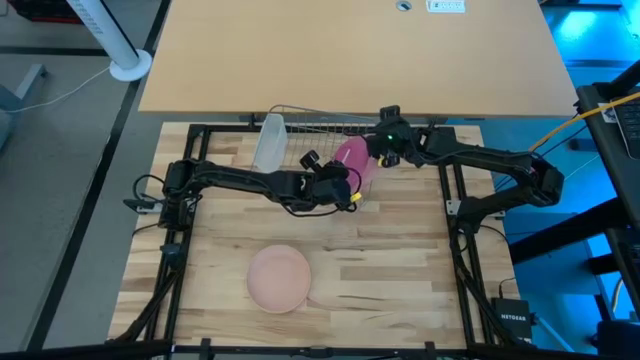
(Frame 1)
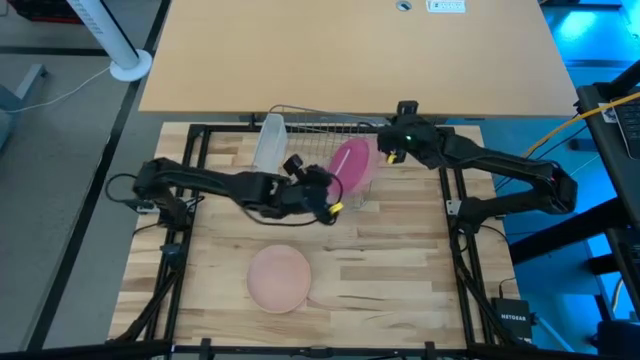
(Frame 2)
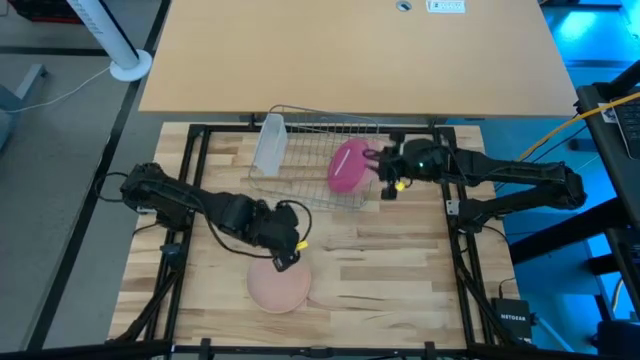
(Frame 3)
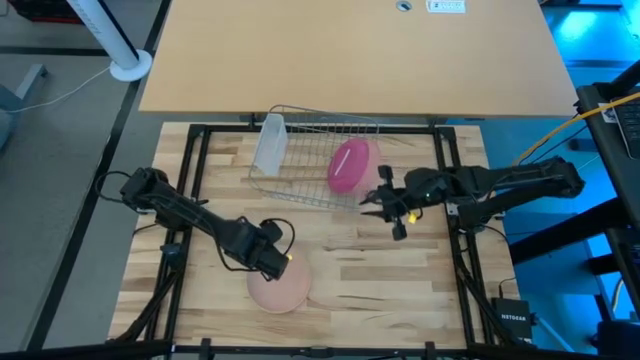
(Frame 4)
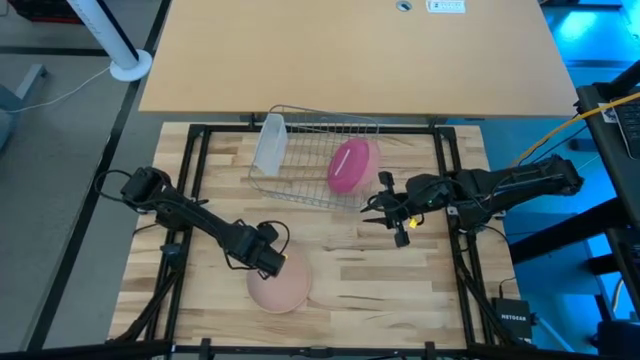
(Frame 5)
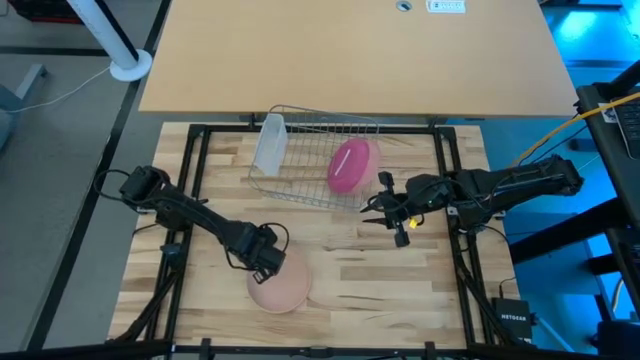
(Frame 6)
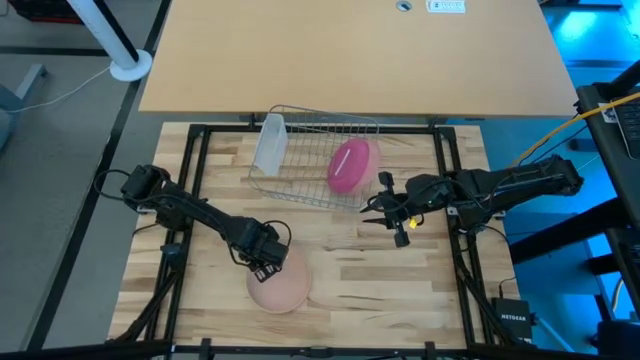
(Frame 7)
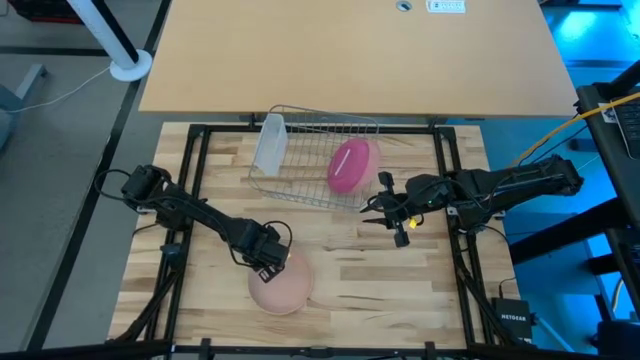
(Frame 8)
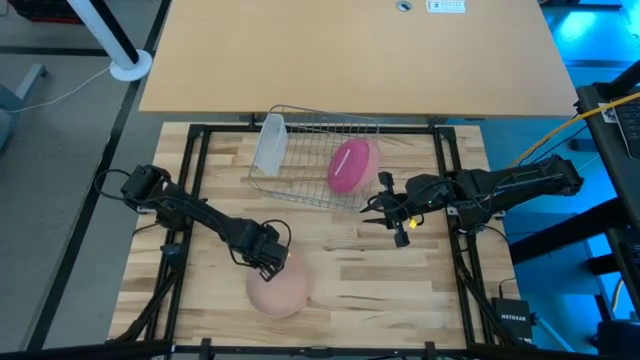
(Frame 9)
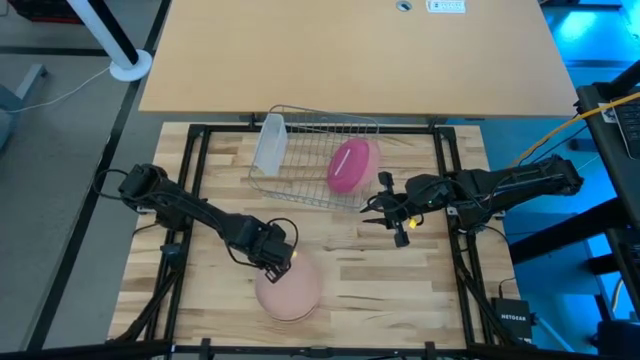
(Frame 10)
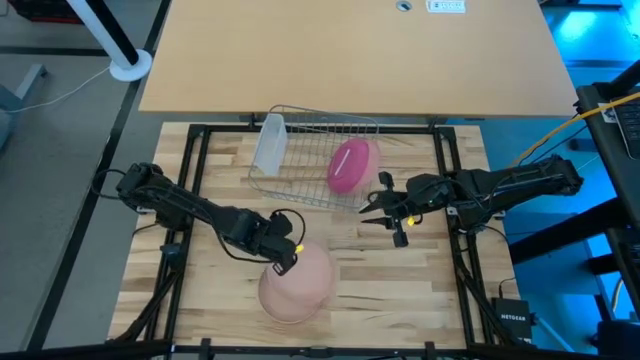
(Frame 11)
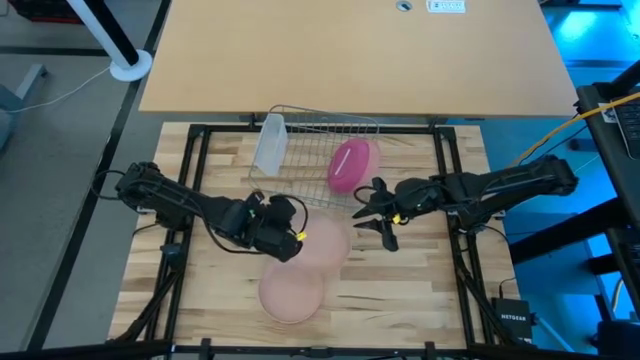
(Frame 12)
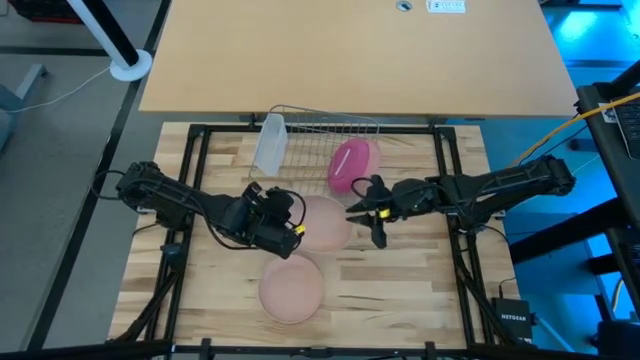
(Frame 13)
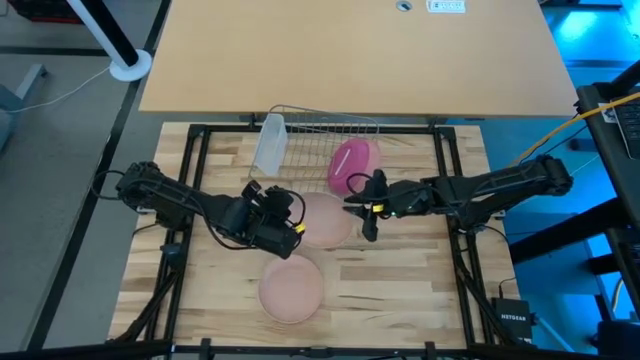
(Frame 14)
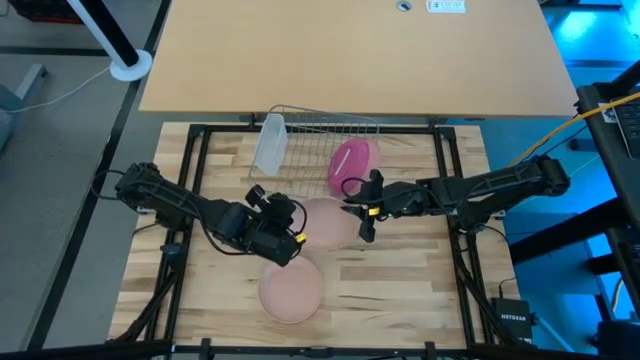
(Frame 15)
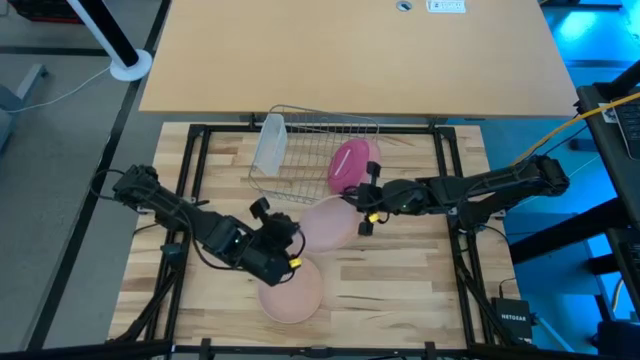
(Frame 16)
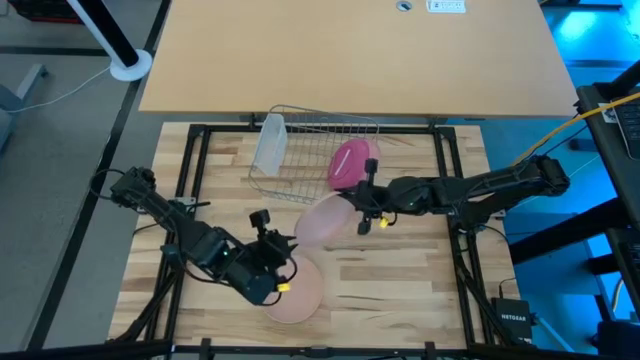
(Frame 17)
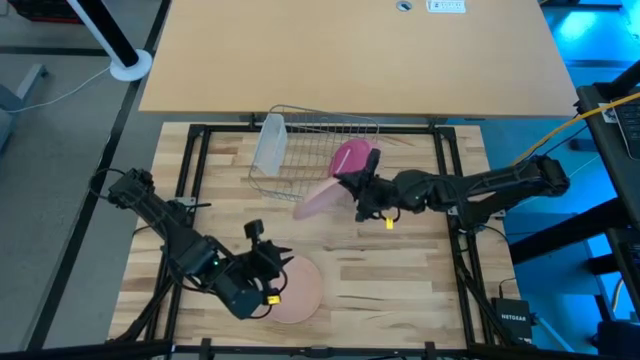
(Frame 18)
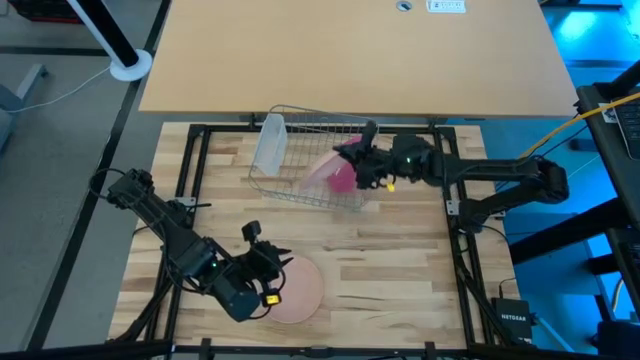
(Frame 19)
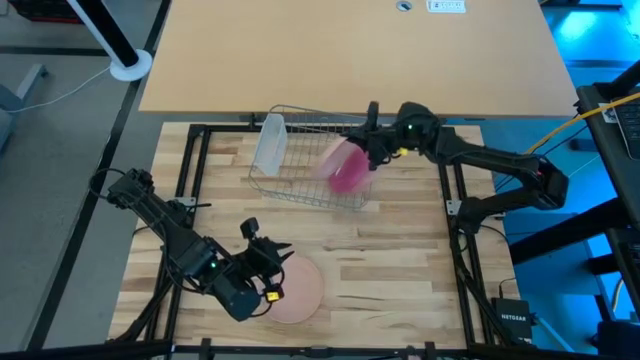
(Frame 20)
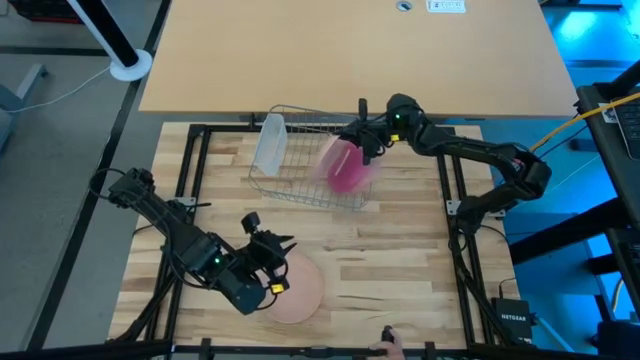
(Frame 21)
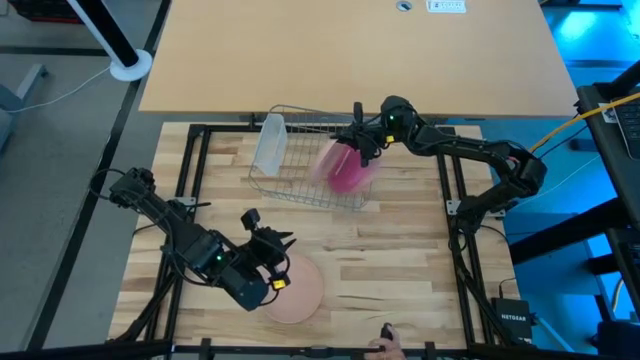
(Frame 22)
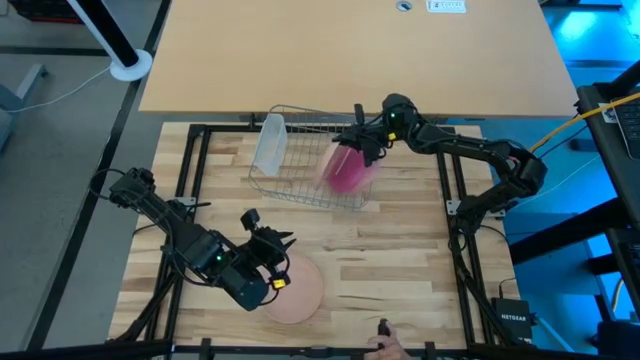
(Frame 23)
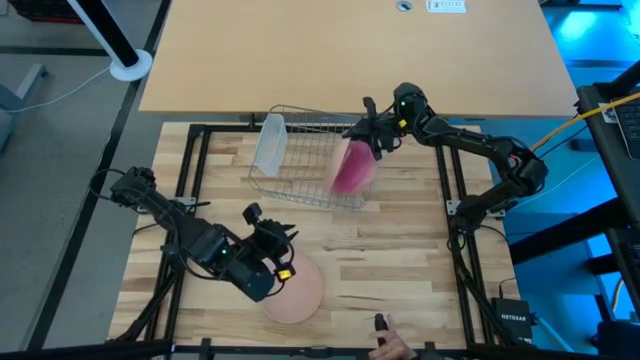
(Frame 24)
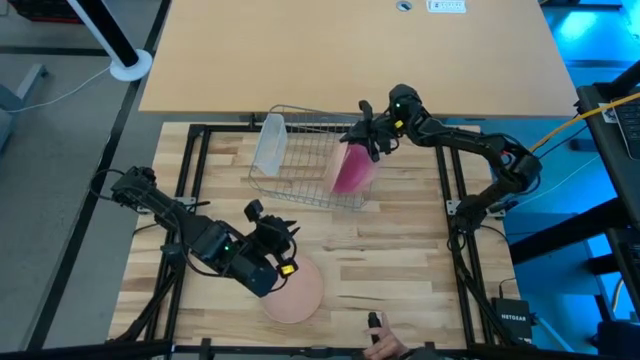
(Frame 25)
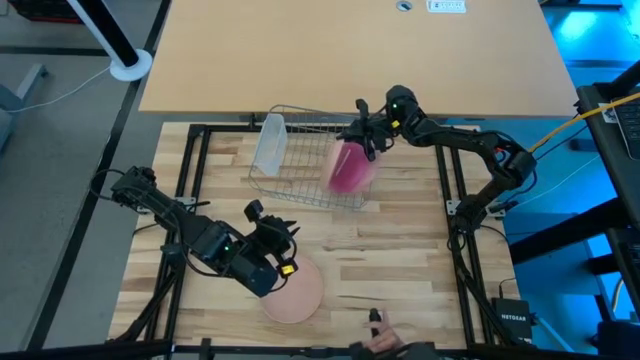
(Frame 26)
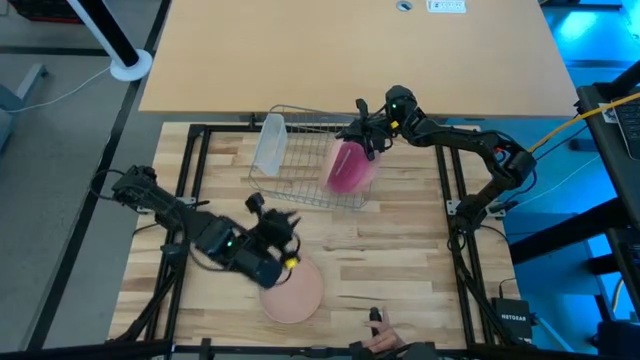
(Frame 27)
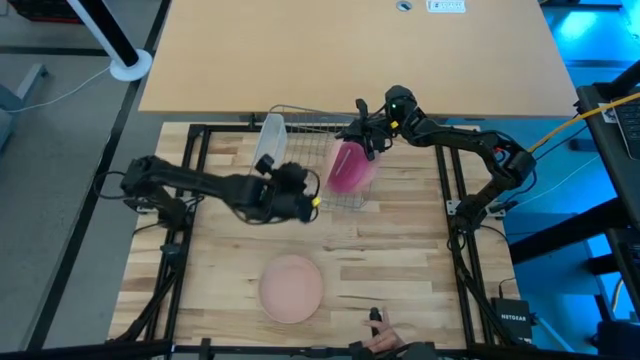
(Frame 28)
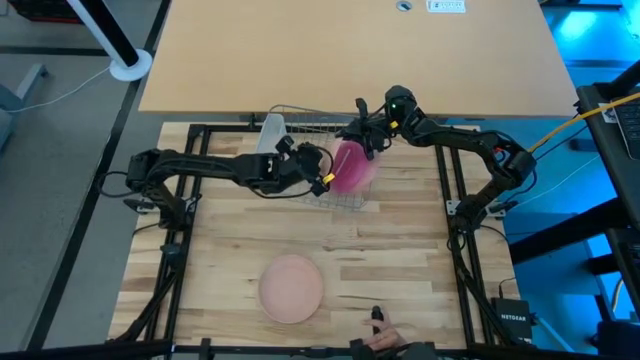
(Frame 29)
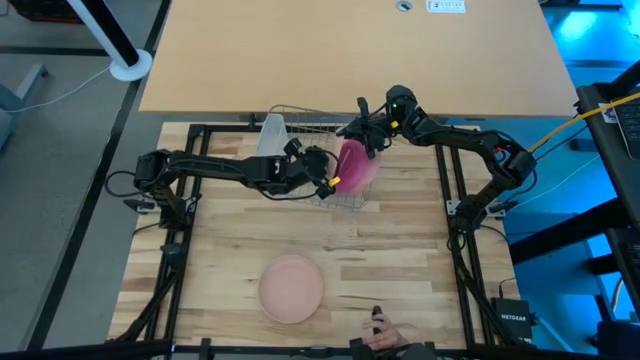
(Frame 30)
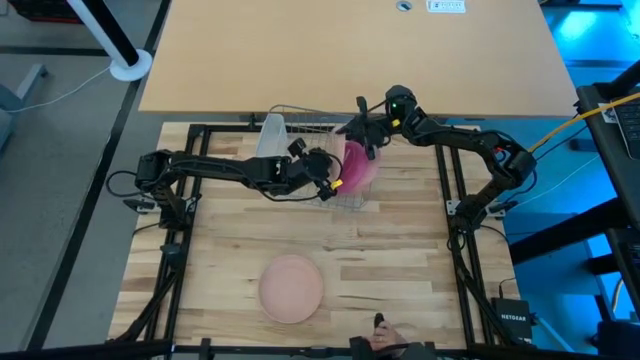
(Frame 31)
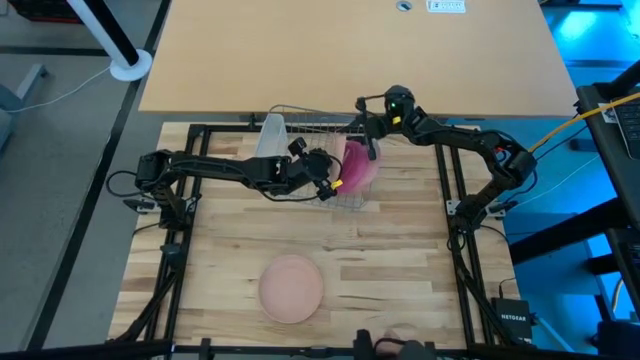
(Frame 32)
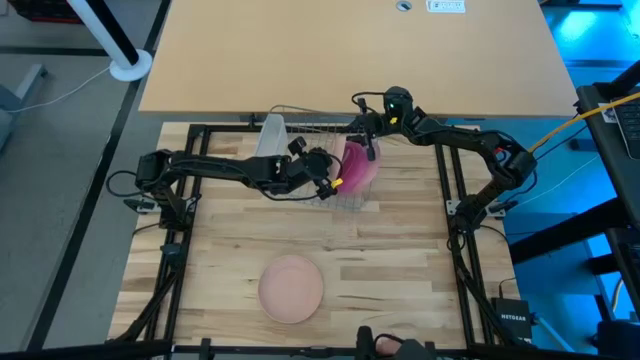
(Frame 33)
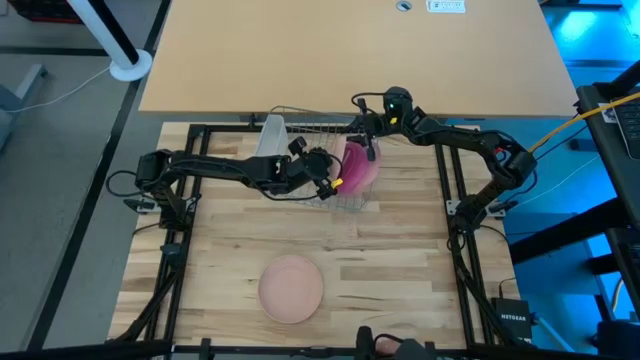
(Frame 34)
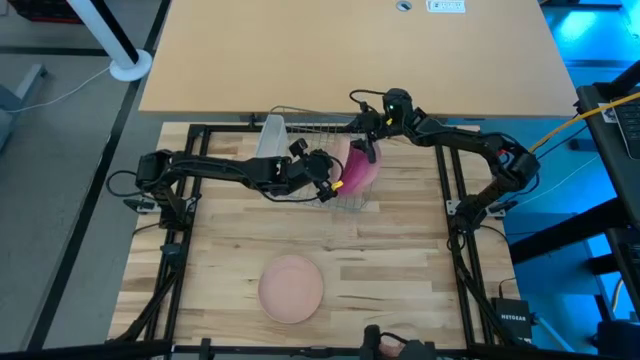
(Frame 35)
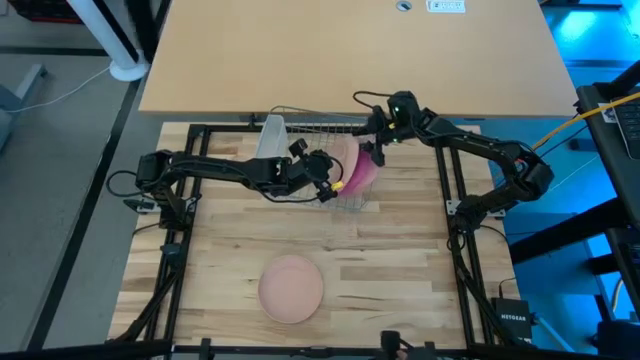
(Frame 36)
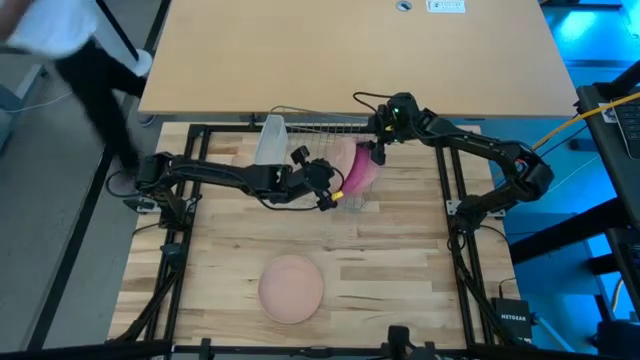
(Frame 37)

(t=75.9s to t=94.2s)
Task: Sort dishes
Put the light red plate into the dish rack

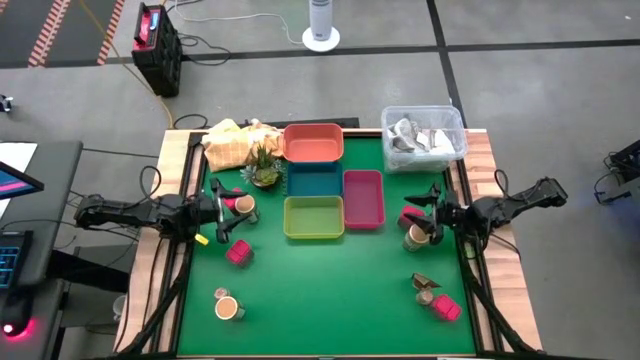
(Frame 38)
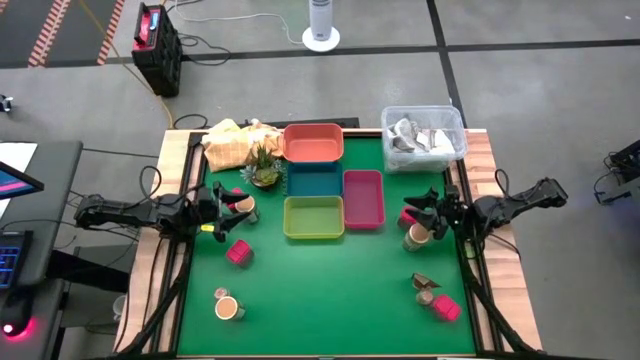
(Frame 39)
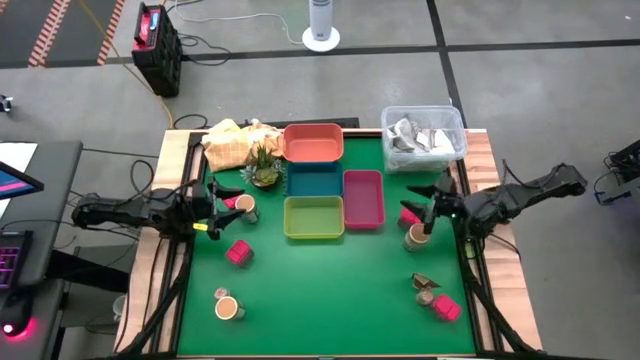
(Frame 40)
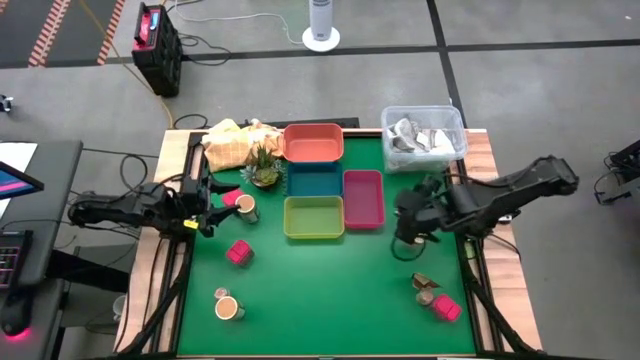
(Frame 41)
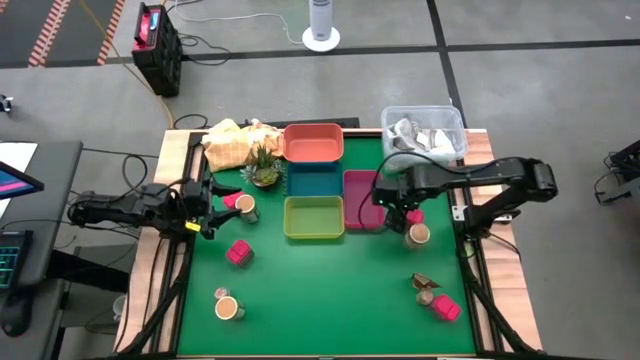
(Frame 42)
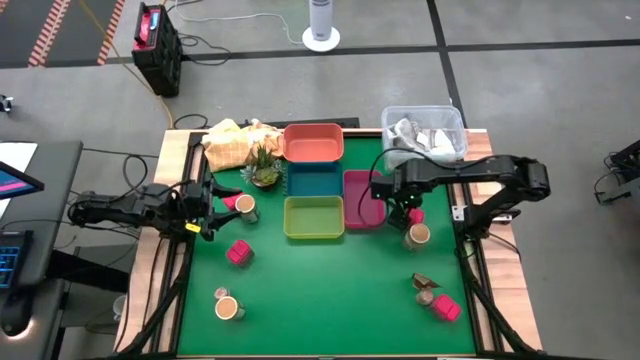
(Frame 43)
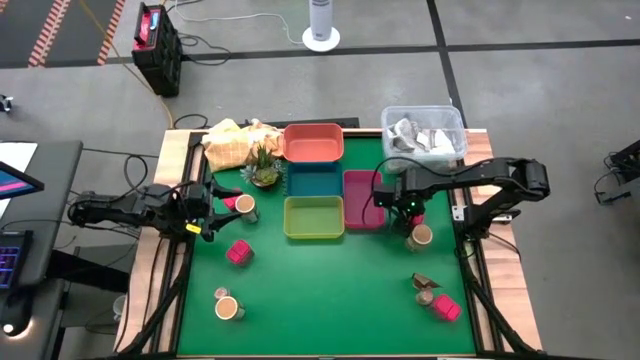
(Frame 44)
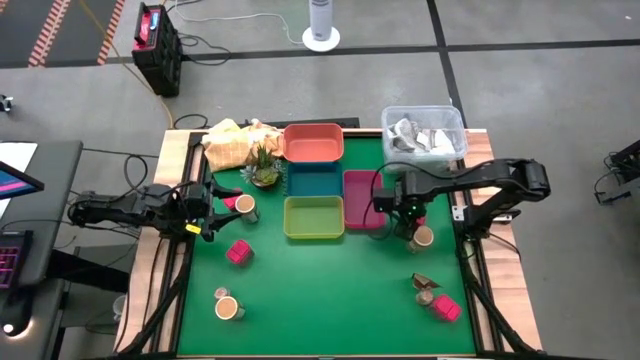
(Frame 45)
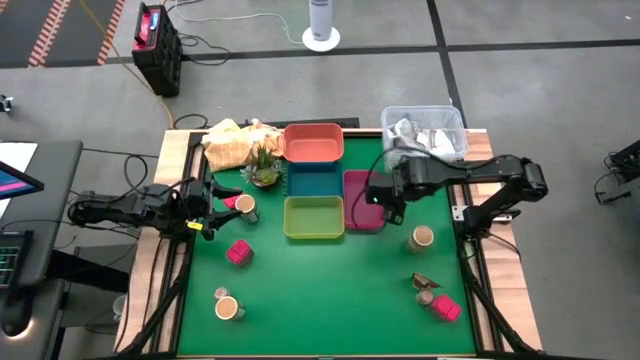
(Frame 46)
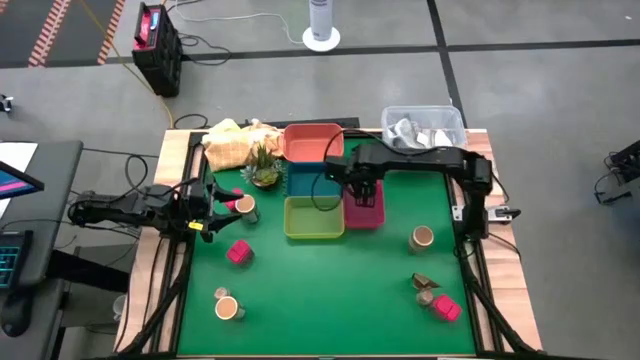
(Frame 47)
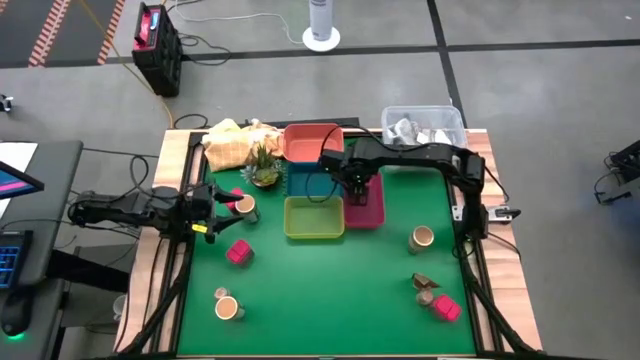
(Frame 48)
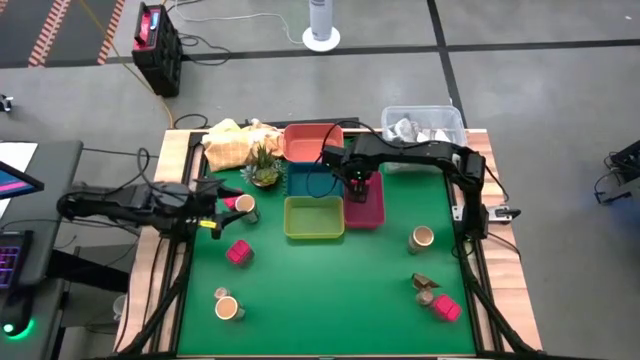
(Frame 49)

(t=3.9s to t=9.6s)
Task: Sort spices by type
Put the top right red seasoning can into the red bin
